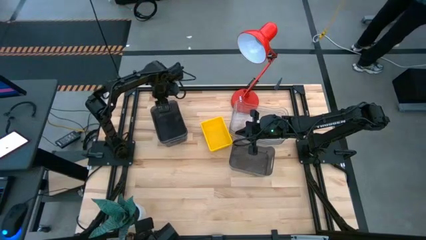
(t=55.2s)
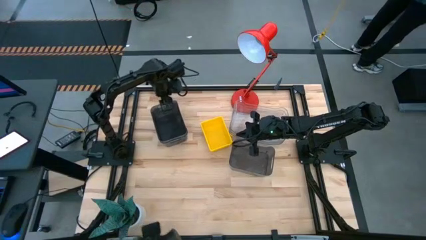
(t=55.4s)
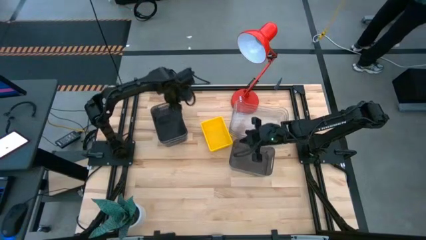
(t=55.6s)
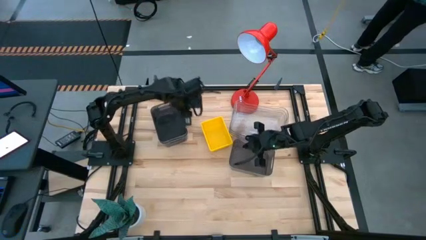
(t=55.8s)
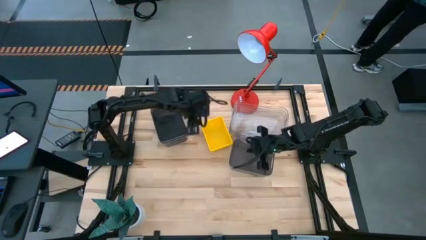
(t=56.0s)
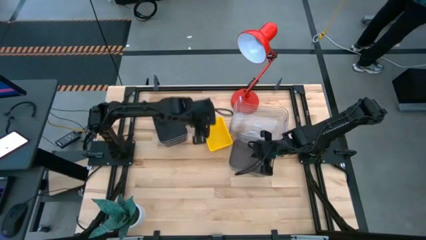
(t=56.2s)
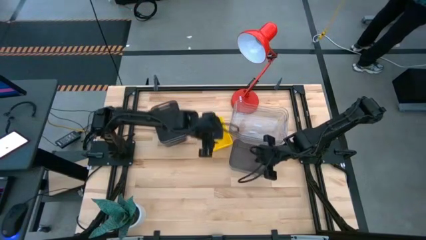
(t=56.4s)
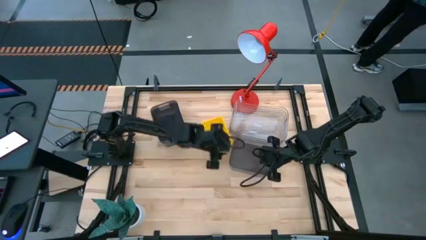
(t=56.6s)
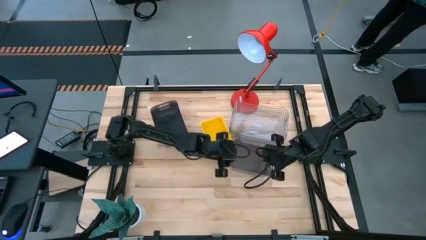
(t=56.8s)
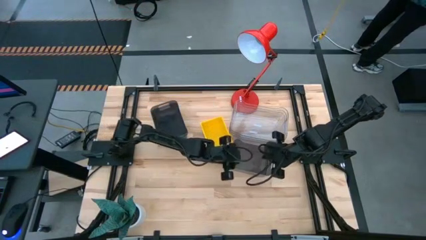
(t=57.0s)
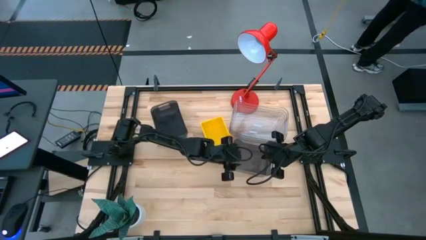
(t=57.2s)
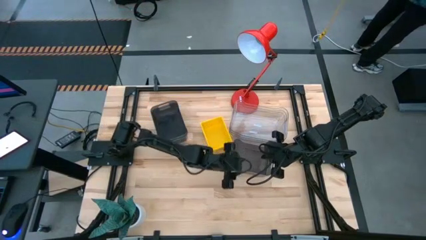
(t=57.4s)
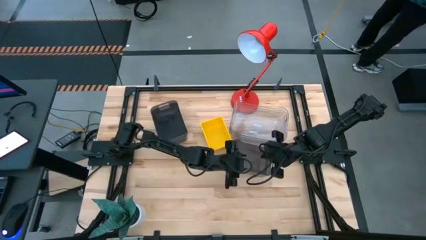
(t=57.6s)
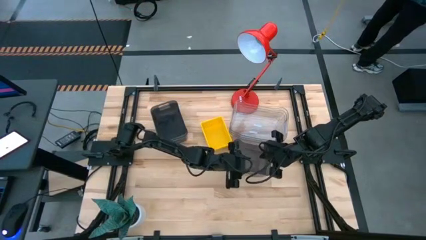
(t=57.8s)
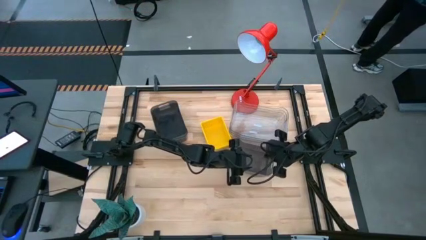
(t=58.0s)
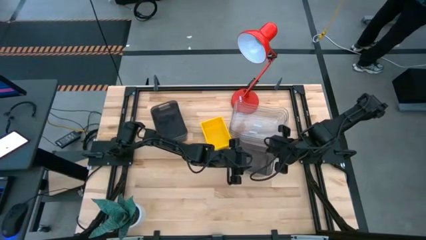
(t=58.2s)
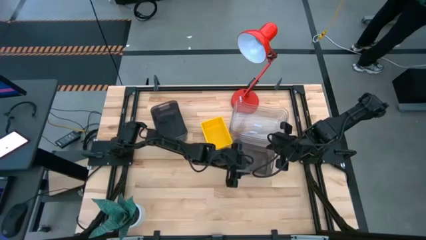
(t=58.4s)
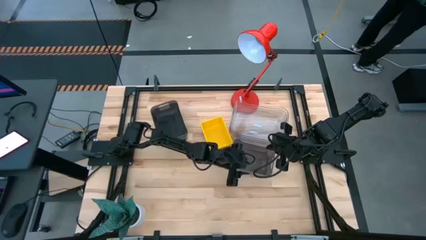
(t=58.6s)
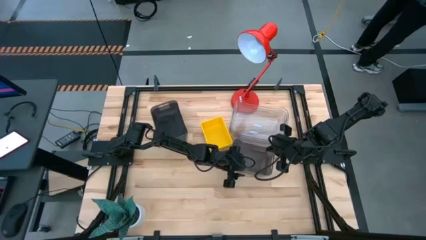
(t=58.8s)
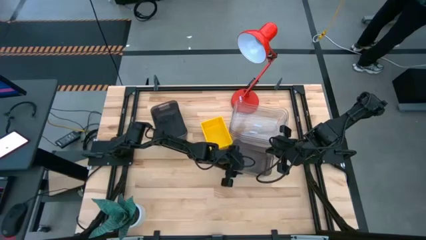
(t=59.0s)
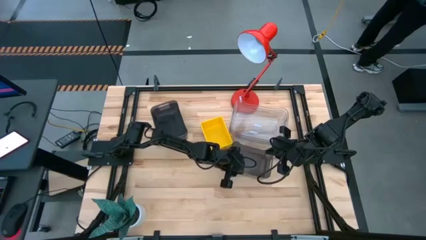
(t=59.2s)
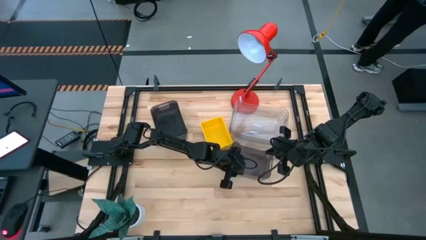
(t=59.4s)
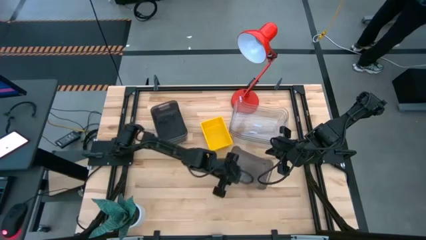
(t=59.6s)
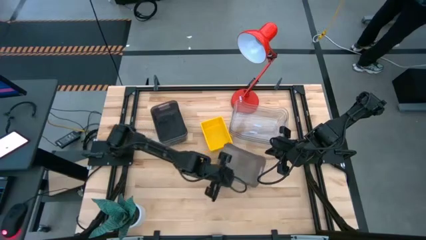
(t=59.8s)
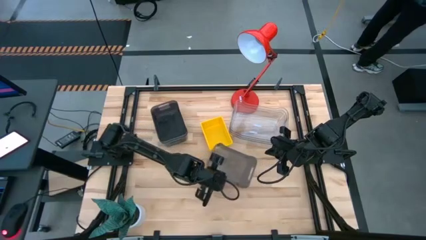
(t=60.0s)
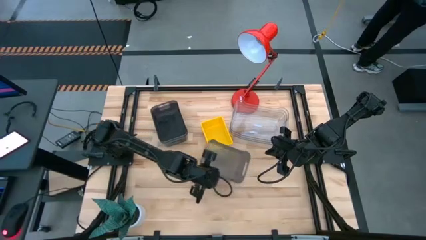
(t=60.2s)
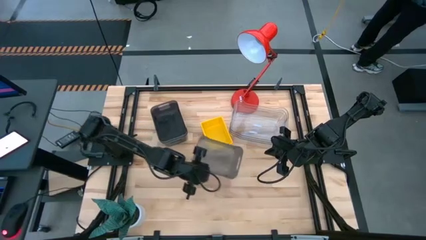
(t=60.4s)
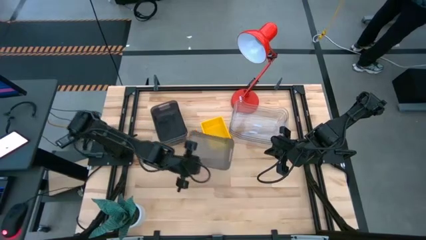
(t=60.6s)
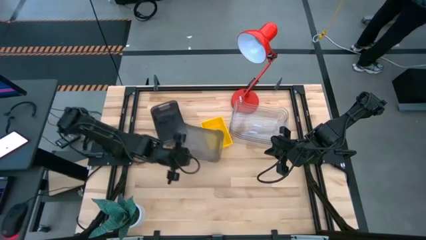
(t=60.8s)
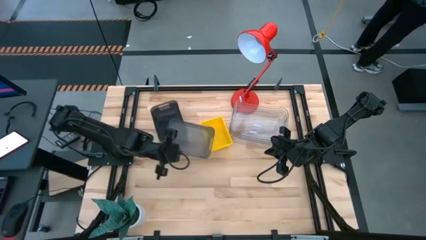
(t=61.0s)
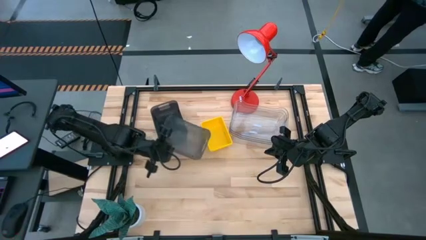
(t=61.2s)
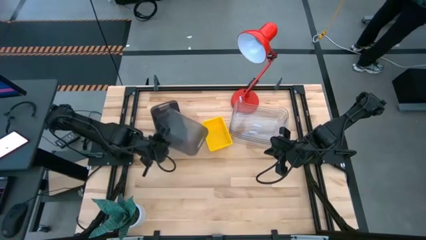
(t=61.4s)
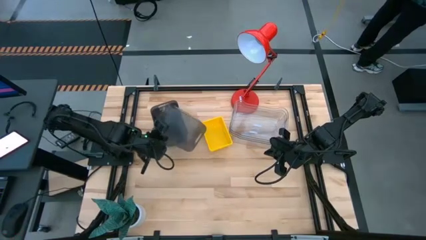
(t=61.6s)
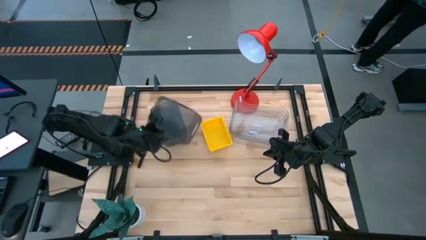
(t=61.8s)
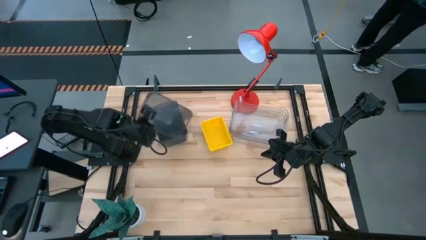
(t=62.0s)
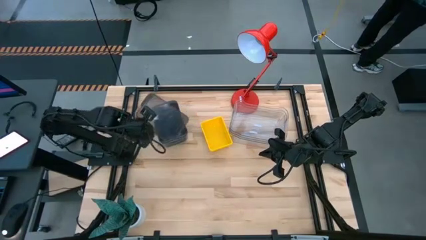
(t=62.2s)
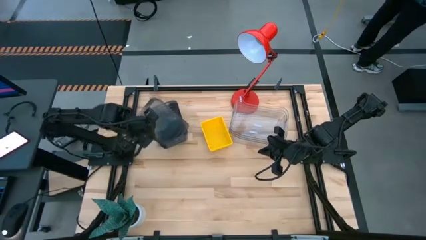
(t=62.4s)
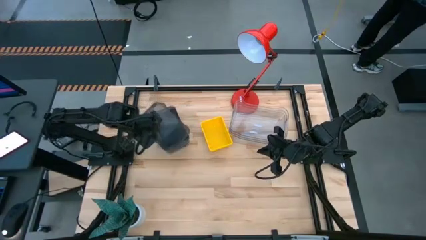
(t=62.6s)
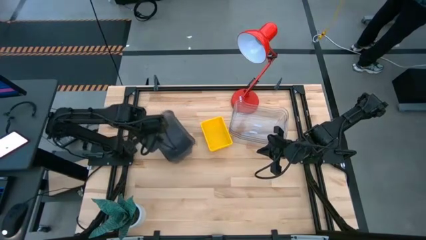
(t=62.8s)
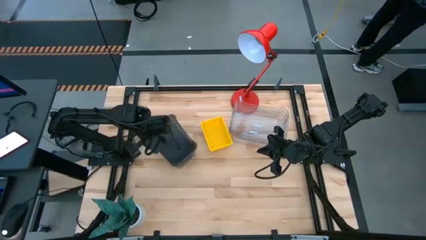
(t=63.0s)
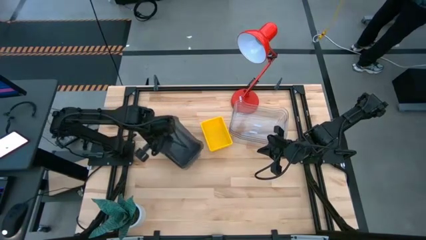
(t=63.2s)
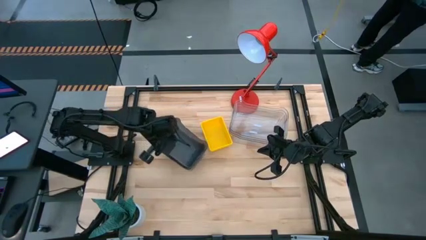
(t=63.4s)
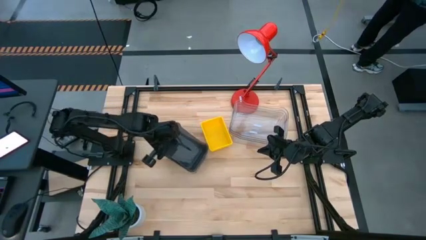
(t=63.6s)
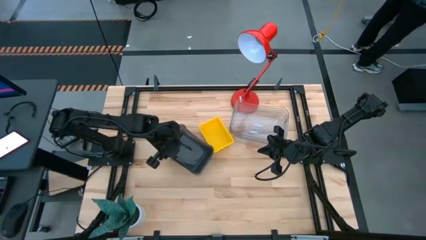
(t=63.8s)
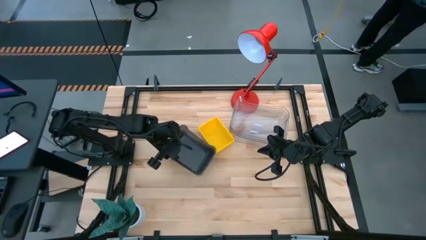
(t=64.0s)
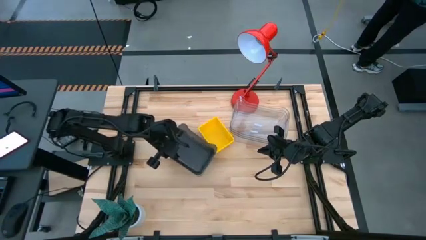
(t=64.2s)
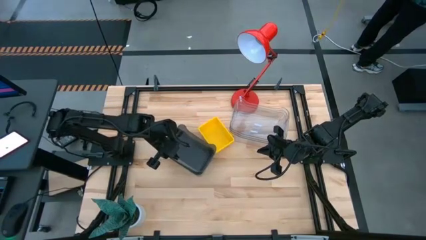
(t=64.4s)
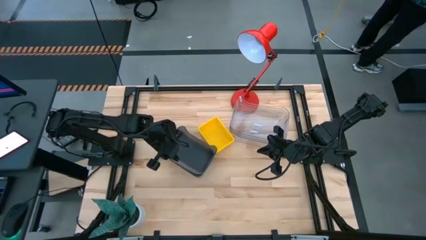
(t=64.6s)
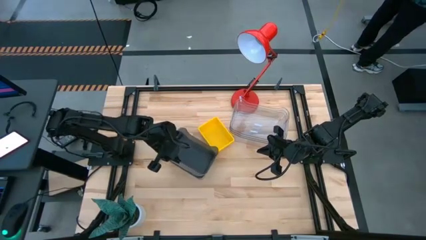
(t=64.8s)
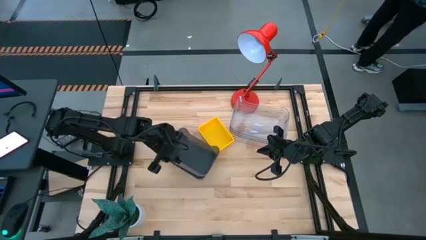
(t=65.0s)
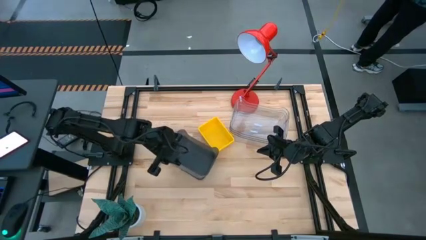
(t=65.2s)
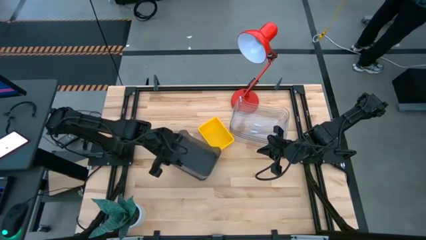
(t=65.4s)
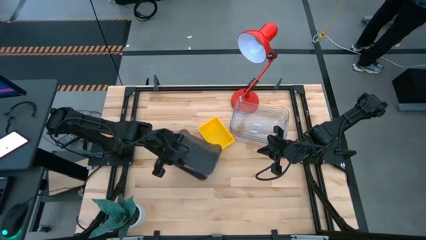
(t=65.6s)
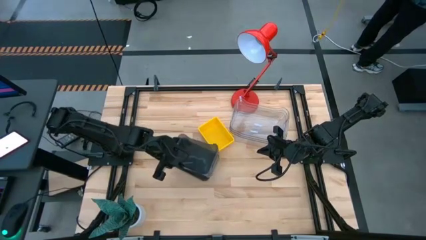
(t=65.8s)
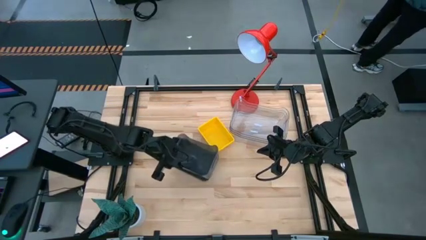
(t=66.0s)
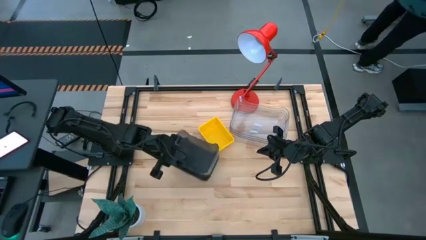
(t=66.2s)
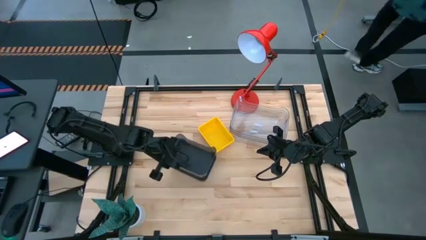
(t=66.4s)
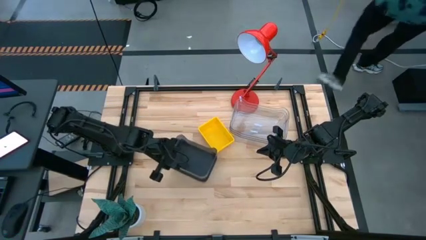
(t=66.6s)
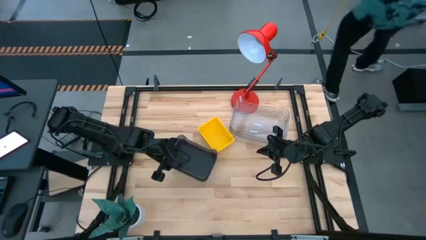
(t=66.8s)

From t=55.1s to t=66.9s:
Stack the right black bin on top of the left black bin

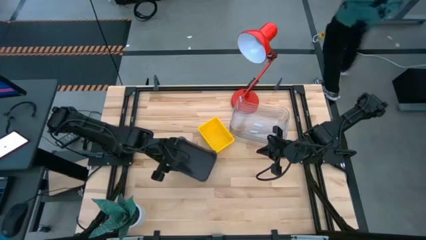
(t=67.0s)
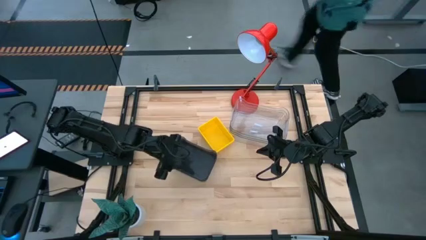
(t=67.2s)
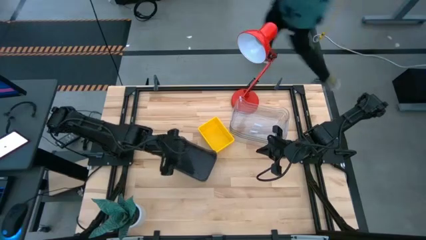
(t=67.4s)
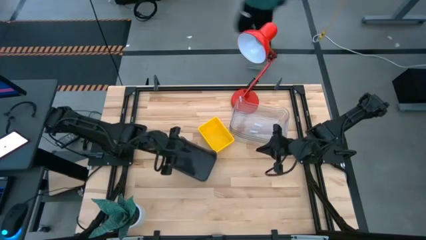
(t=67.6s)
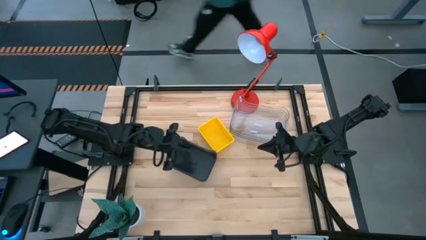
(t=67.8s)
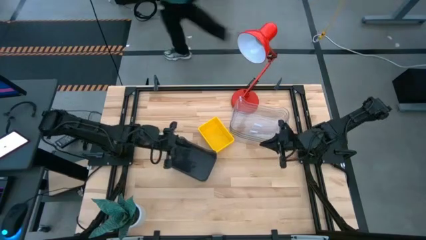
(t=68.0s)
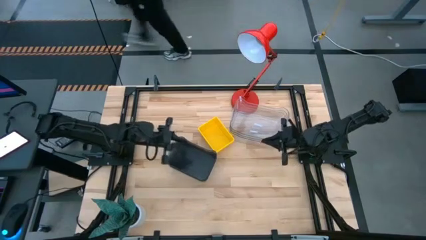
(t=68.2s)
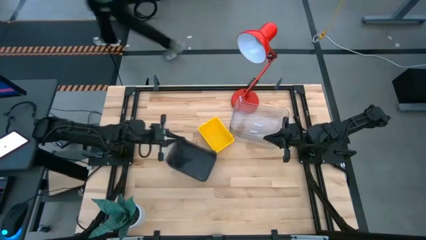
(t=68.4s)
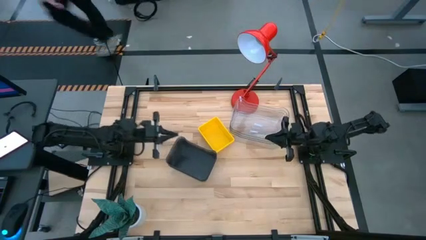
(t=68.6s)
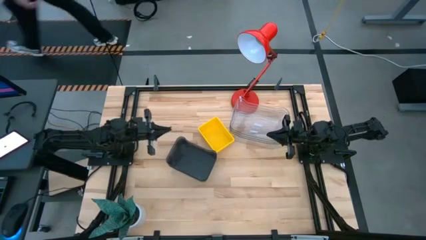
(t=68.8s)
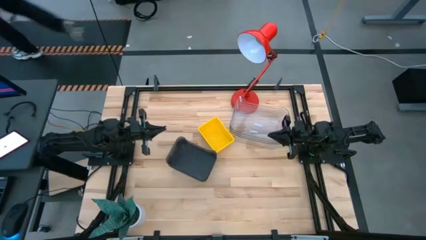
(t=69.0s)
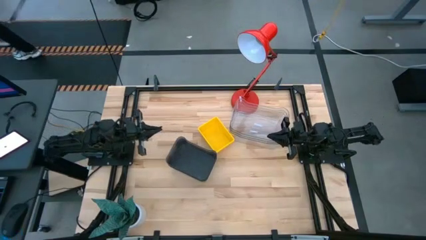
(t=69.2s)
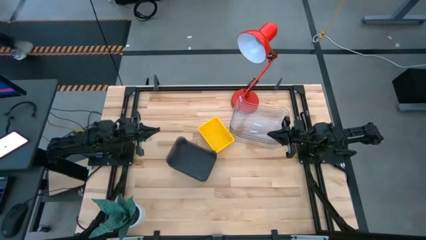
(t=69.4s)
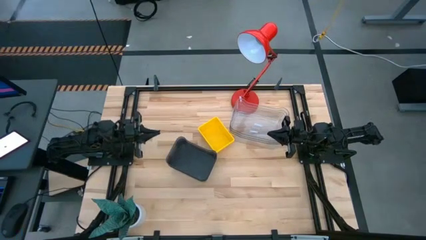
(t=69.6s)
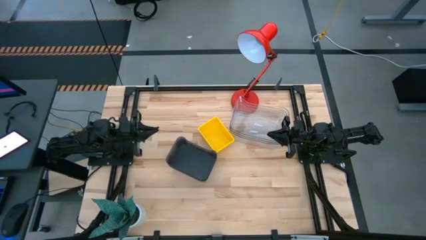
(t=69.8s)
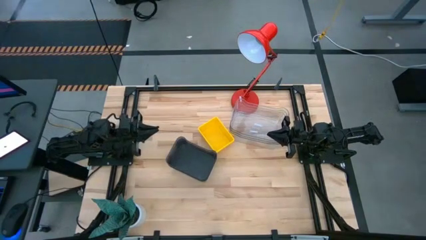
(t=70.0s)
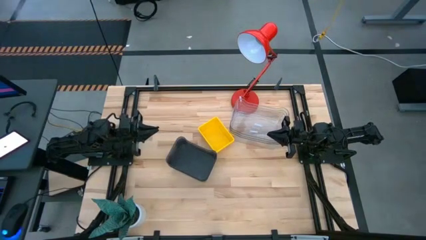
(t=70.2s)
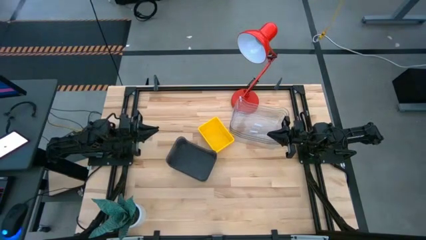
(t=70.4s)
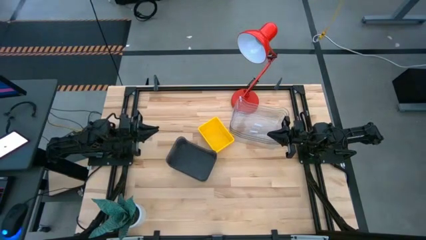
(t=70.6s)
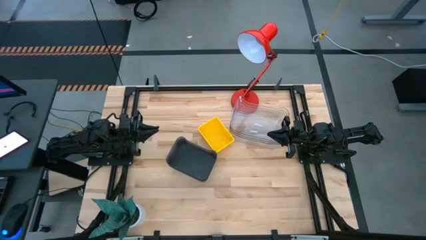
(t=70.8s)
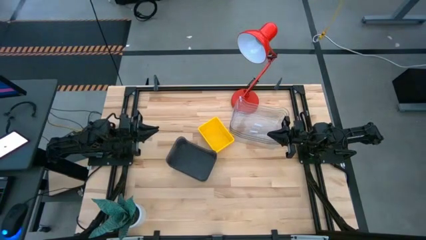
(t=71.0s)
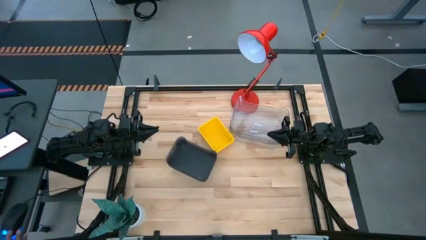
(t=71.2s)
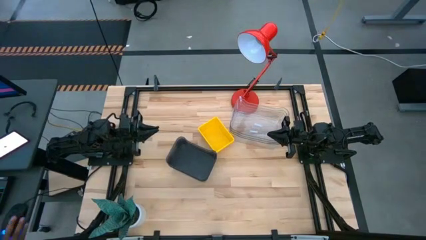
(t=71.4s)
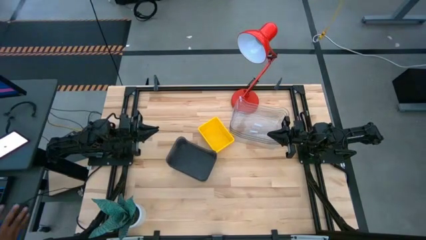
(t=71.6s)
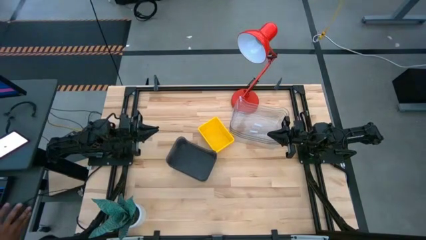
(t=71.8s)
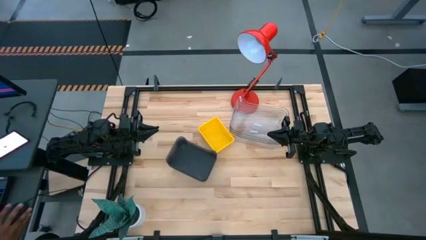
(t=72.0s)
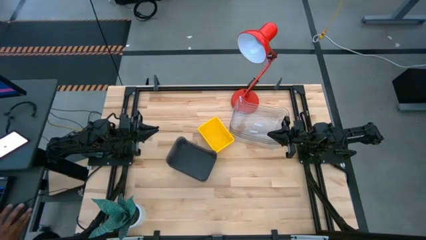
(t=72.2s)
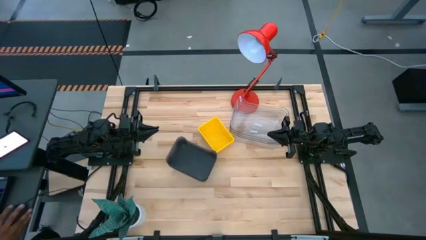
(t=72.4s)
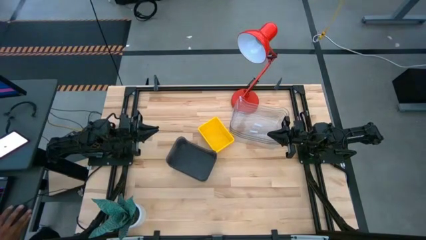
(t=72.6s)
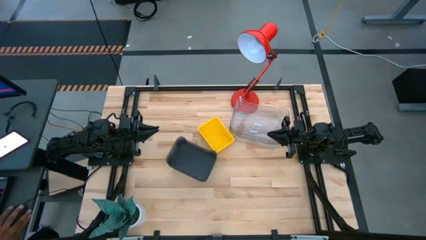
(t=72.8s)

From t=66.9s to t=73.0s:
Return to Home Position
